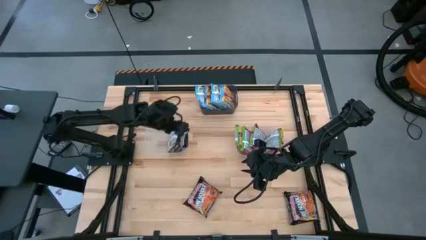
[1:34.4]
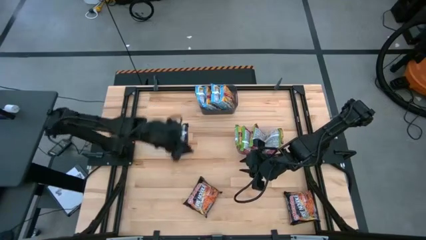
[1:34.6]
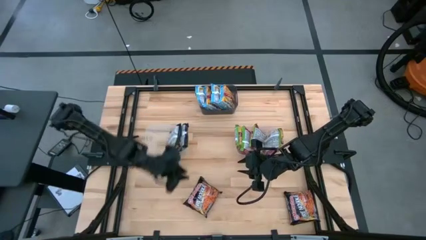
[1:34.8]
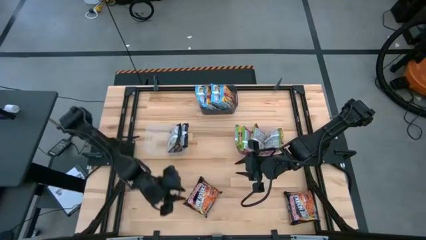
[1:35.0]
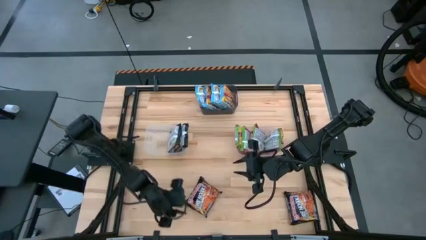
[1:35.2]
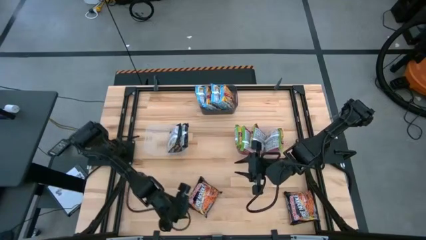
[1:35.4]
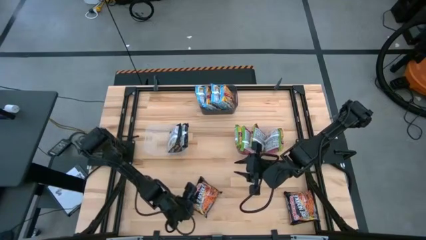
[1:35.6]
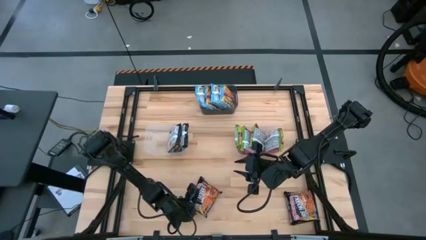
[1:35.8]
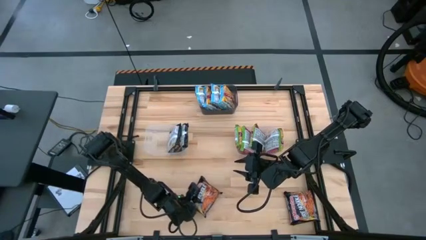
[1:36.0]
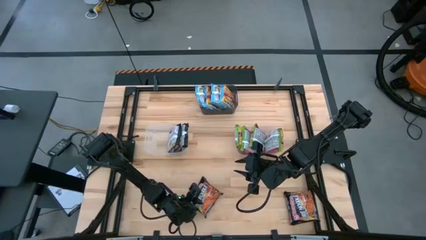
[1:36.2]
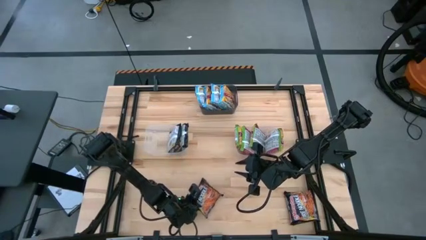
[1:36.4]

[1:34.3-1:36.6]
Task: Sort Maruchan noodles
Put the black noodle pack into the left transparent bin

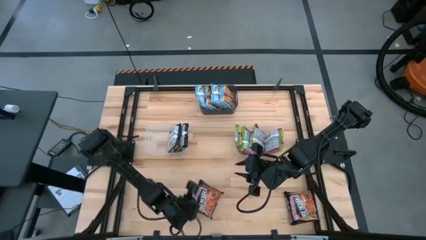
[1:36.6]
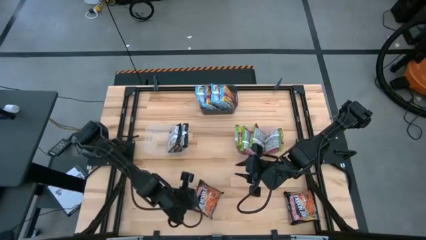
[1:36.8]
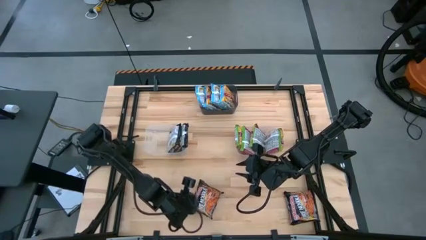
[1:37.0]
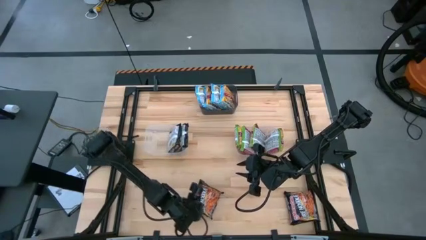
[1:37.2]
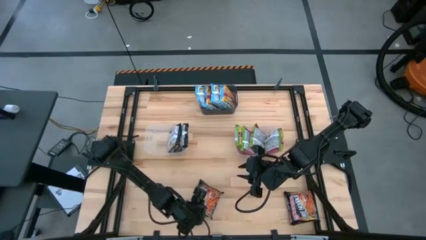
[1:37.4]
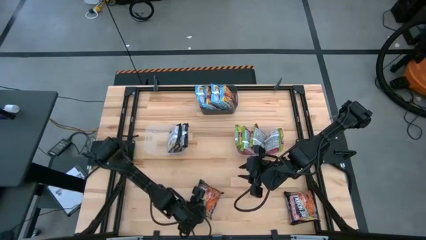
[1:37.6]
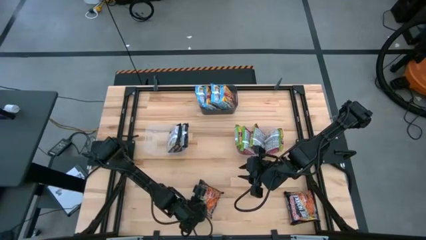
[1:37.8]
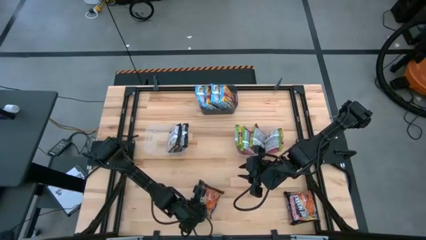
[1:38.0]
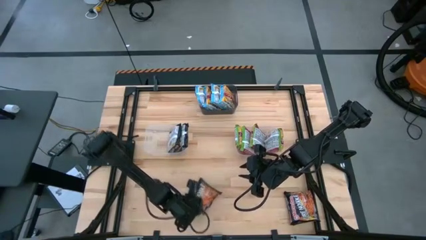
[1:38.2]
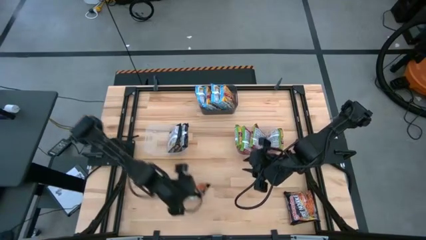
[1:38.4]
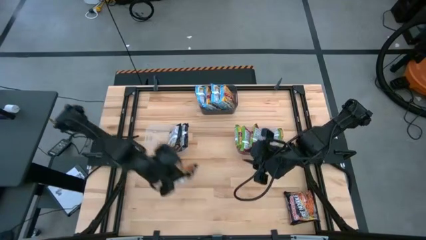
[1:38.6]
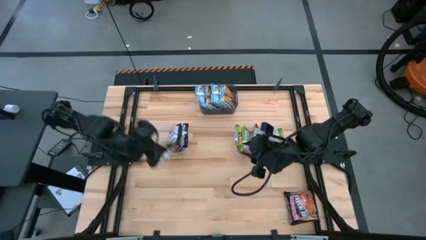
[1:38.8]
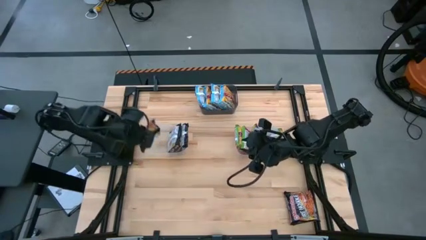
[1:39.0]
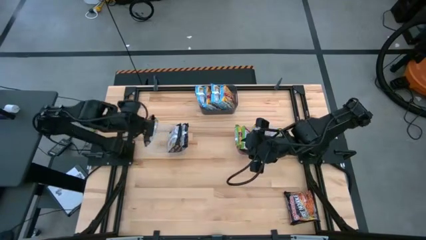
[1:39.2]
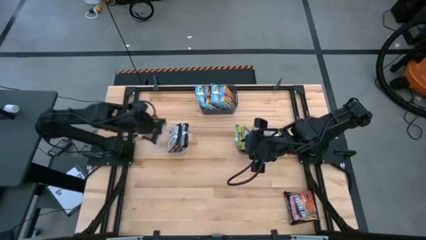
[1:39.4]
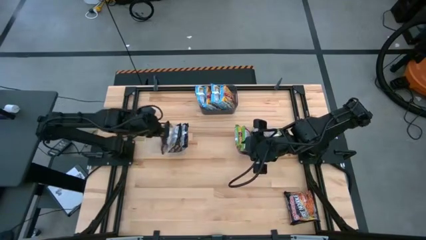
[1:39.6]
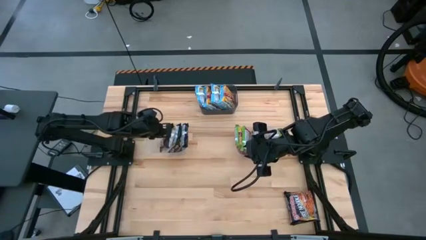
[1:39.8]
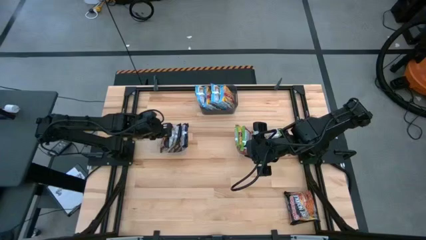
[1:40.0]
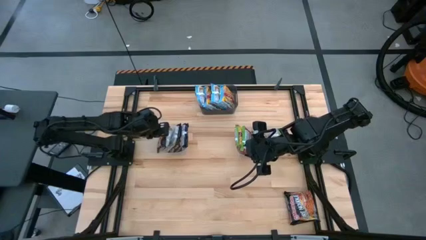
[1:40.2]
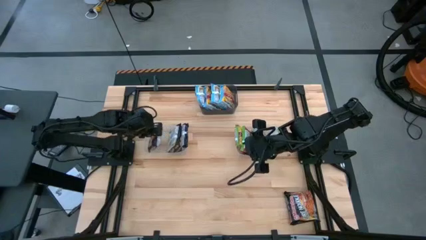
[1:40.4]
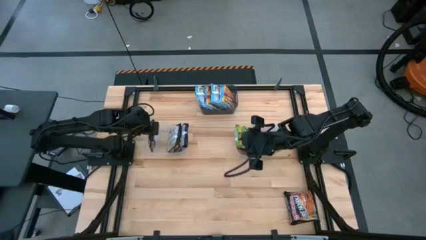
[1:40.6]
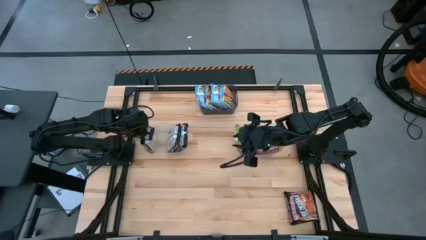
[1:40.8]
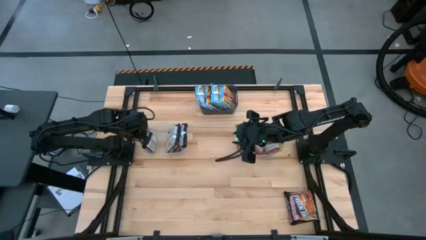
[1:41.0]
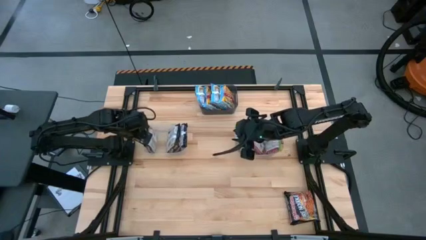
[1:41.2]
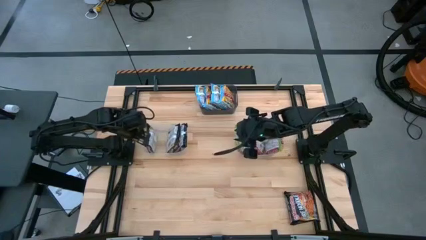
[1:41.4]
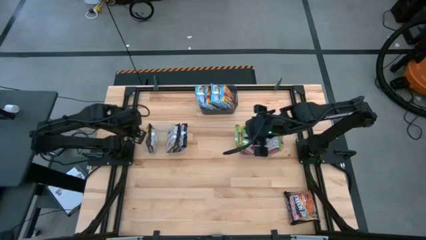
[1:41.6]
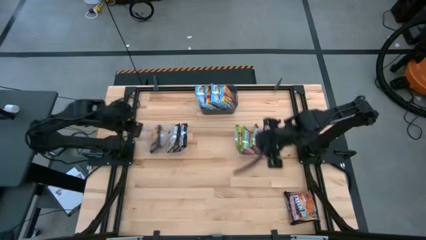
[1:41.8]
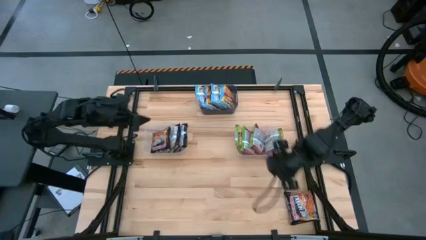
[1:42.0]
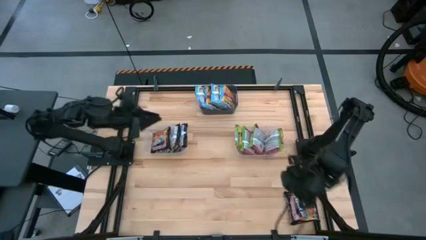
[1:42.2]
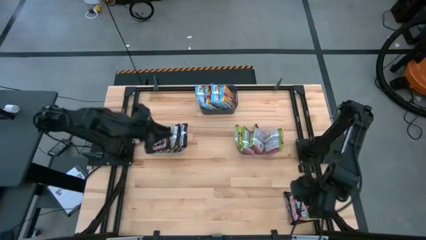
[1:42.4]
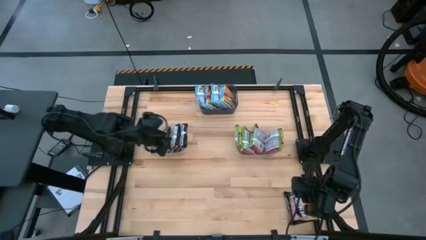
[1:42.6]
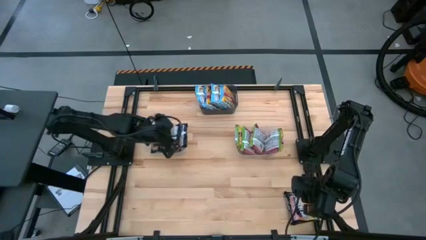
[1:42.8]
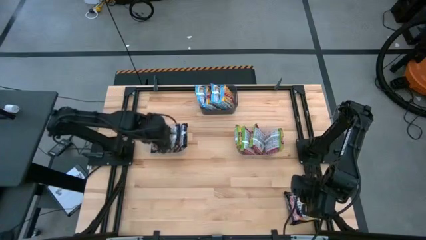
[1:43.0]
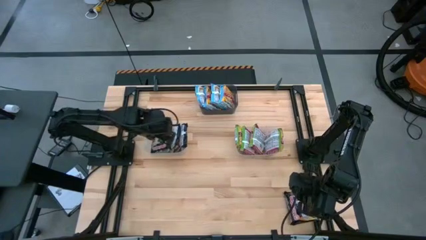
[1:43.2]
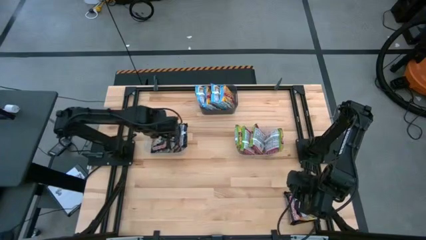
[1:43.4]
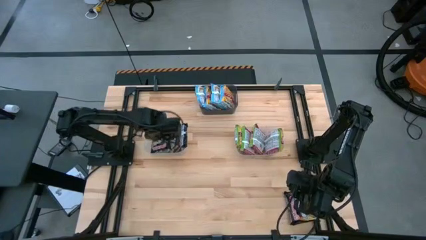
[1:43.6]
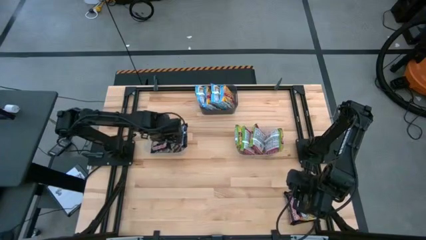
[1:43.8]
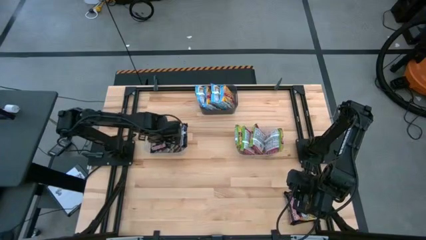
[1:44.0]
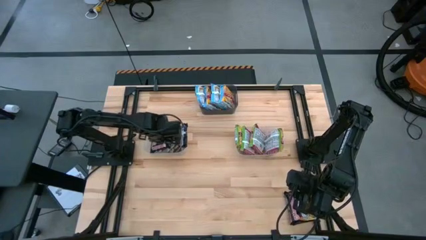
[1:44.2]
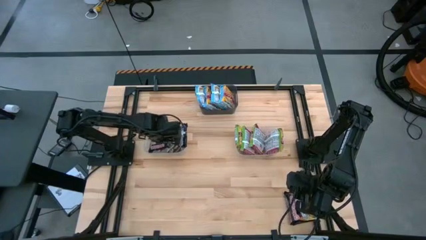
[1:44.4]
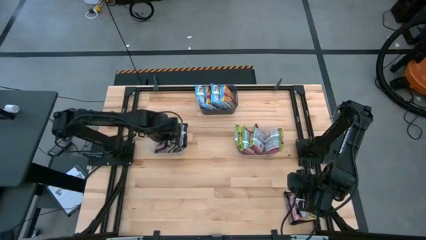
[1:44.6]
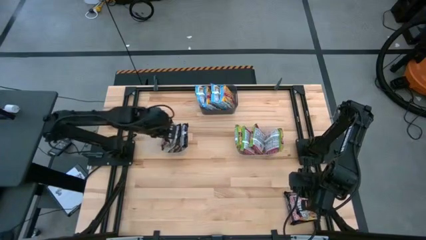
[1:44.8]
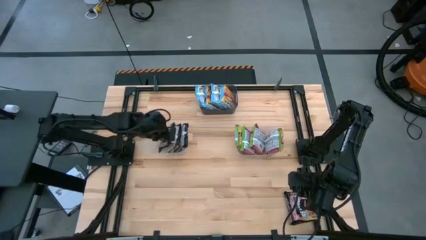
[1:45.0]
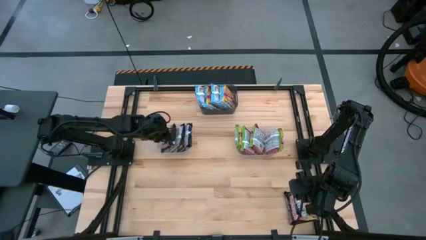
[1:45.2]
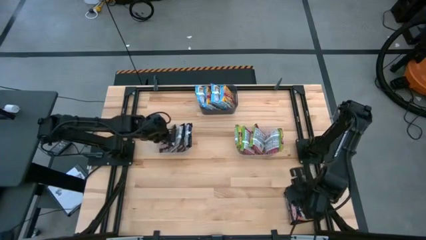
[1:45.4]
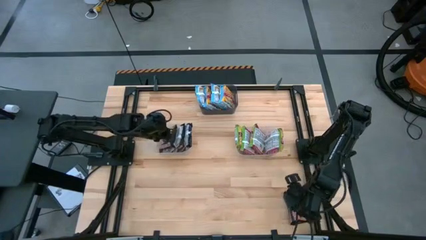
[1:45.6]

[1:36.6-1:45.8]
Put the black noodle pack into the left transparent bin

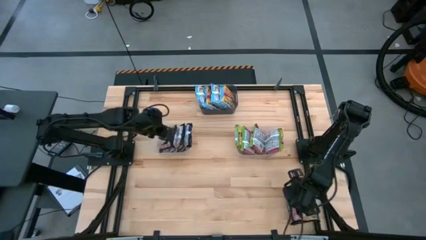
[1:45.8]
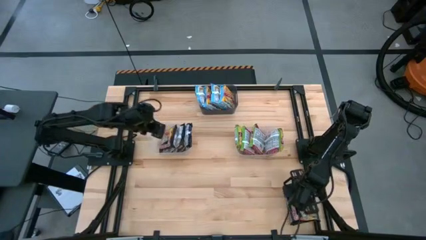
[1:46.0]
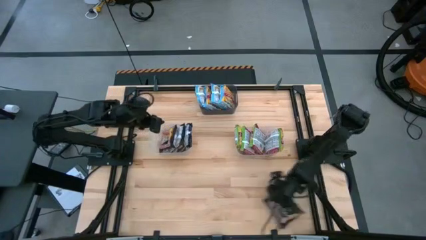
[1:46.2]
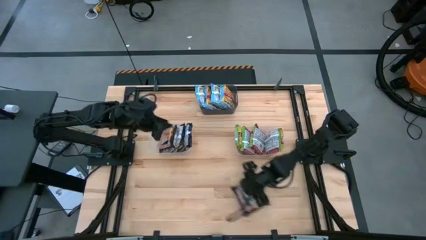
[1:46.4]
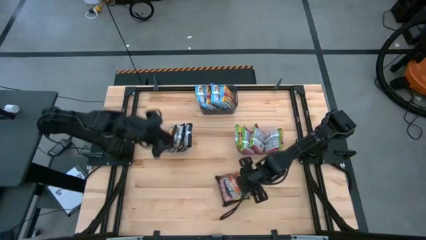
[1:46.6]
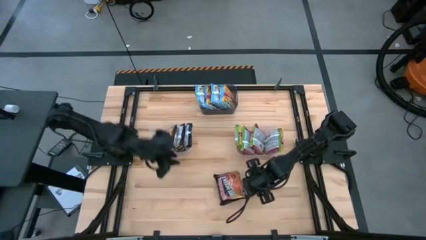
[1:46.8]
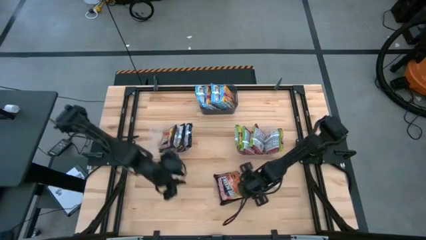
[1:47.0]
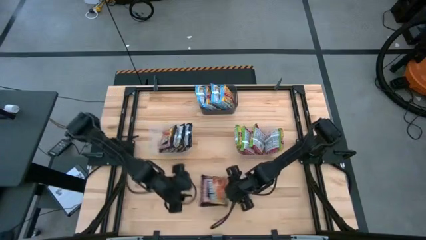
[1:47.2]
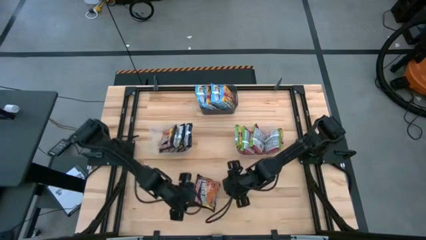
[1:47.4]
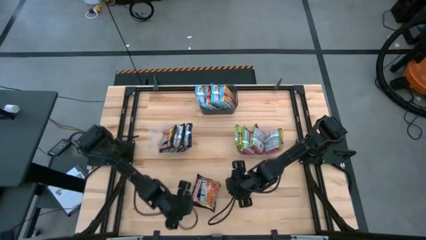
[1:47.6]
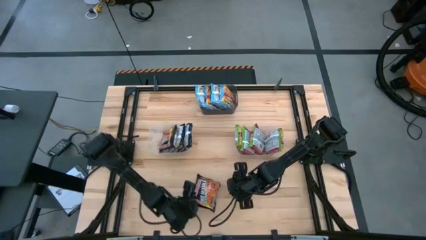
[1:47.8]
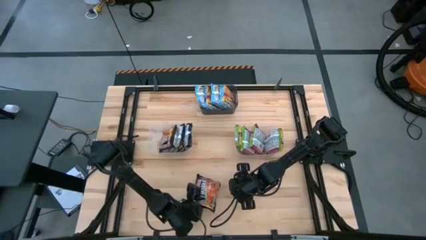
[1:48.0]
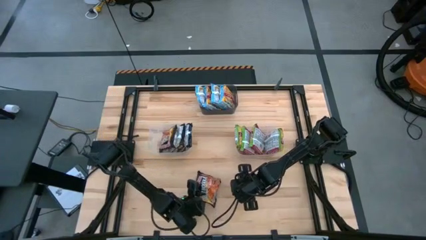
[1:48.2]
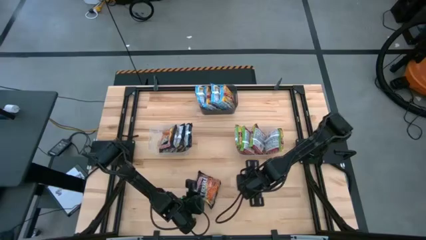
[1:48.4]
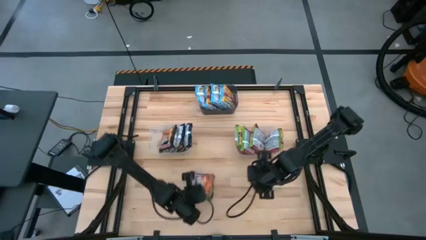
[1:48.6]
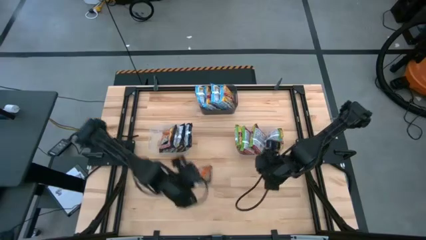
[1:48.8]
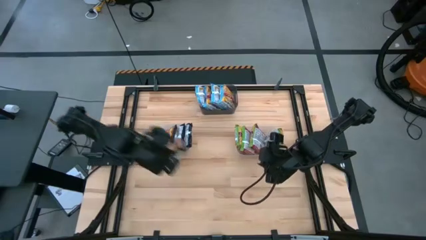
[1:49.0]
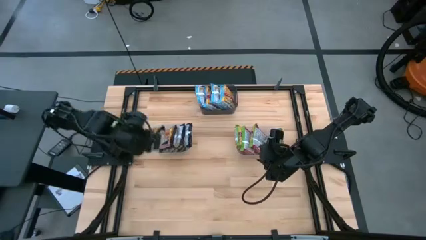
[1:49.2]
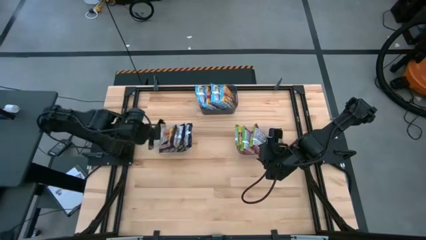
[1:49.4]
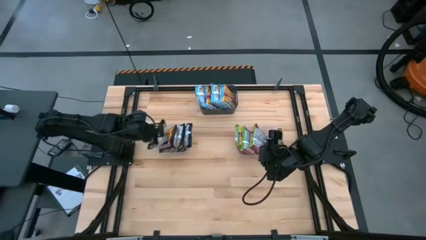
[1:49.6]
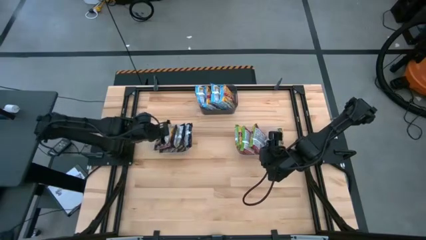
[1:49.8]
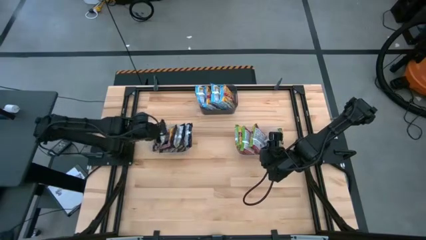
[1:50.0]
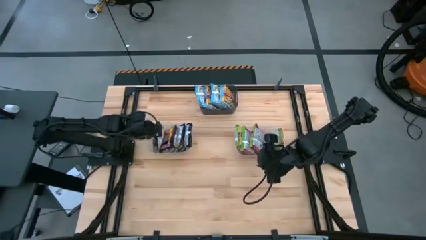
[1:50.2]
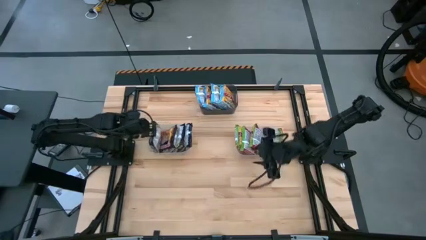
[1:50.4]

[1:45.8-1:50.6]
Put the black noodle pack into the left transparent bin
